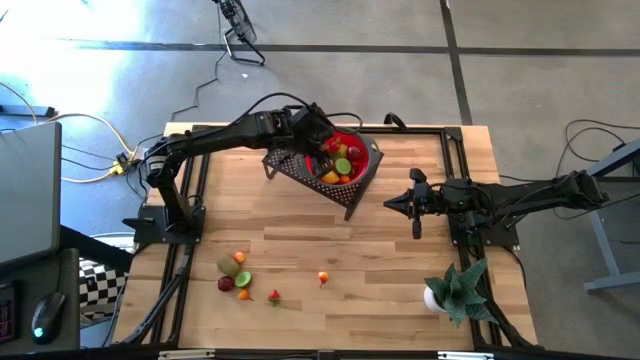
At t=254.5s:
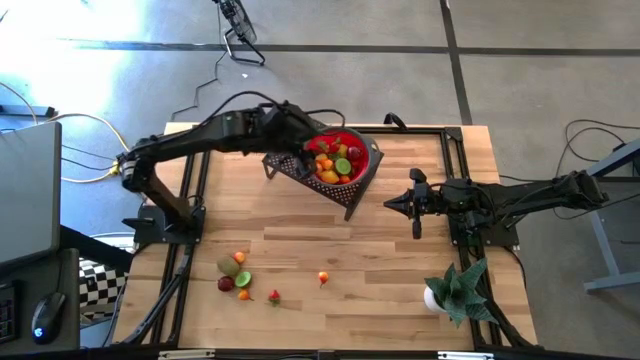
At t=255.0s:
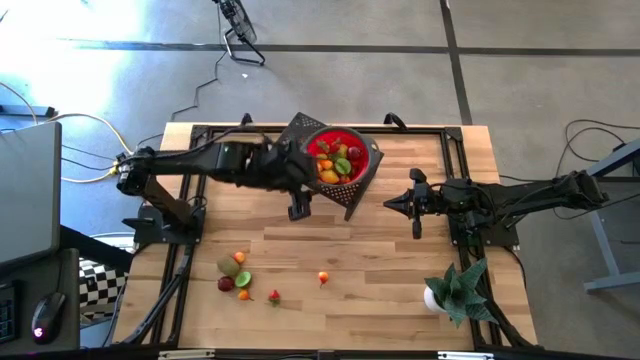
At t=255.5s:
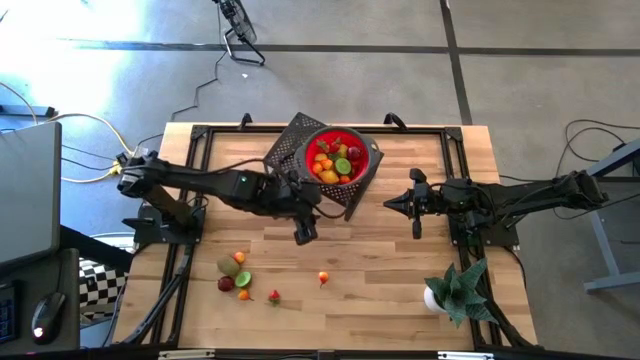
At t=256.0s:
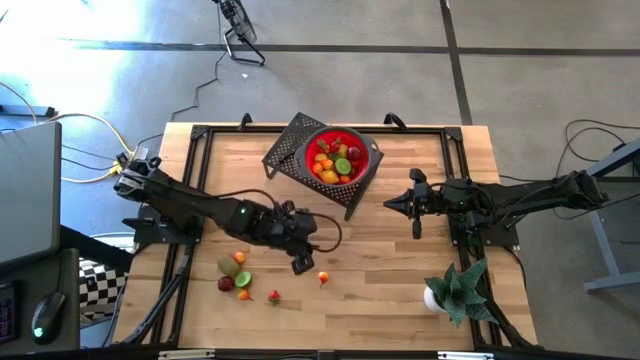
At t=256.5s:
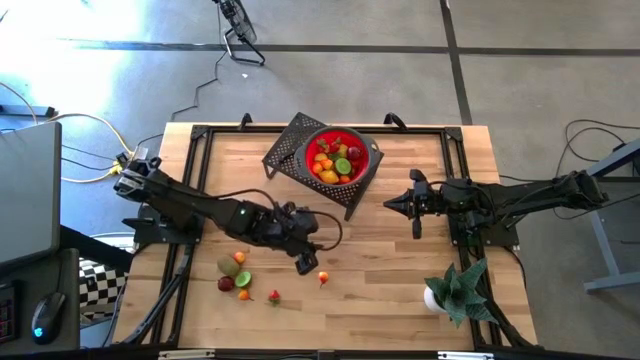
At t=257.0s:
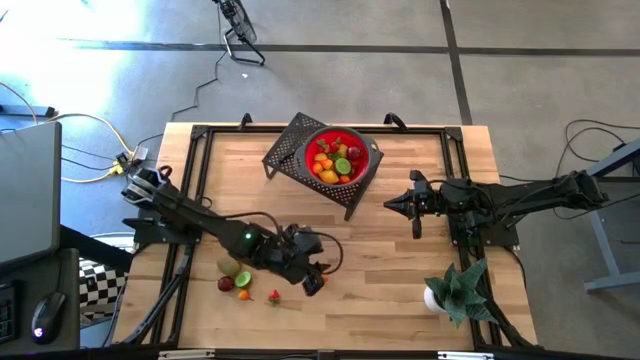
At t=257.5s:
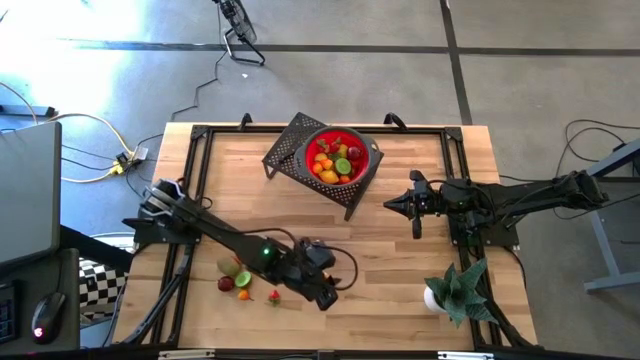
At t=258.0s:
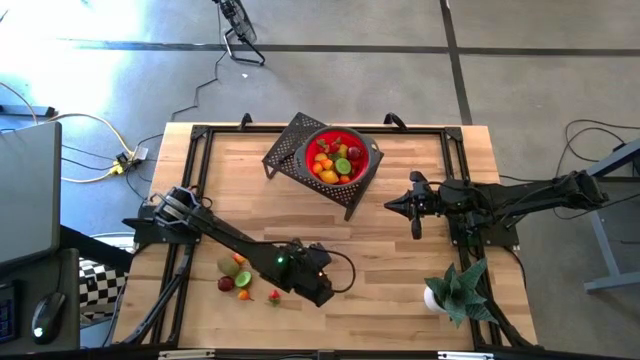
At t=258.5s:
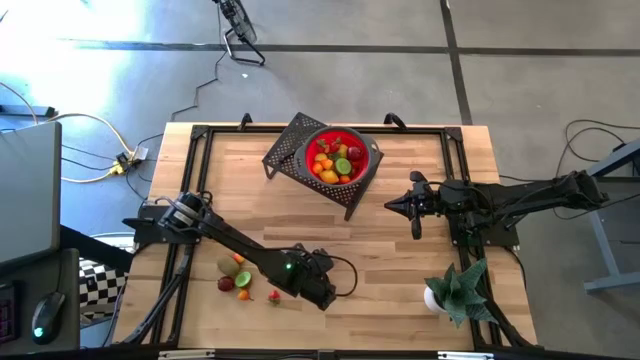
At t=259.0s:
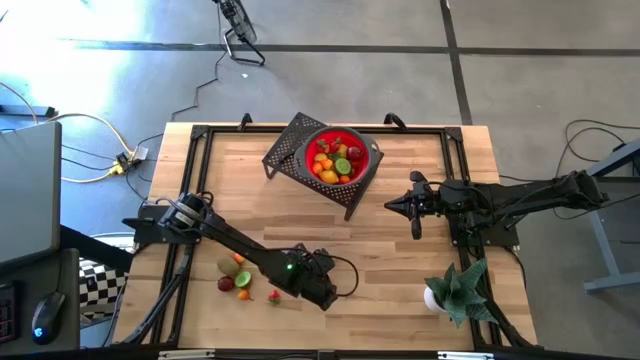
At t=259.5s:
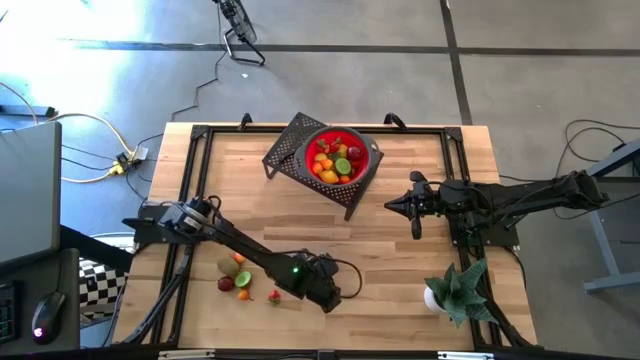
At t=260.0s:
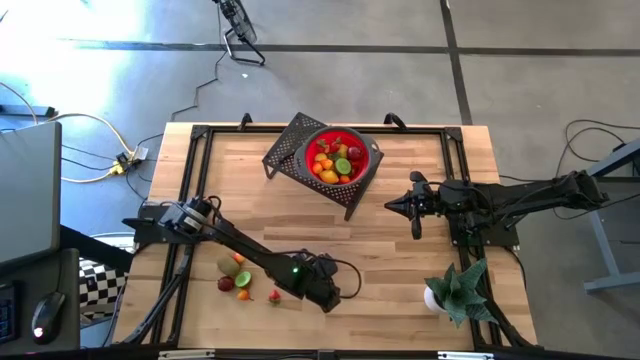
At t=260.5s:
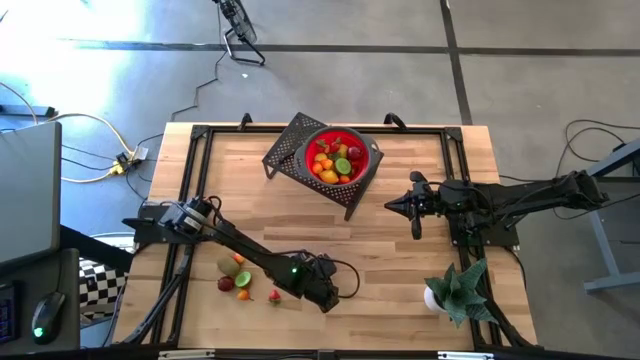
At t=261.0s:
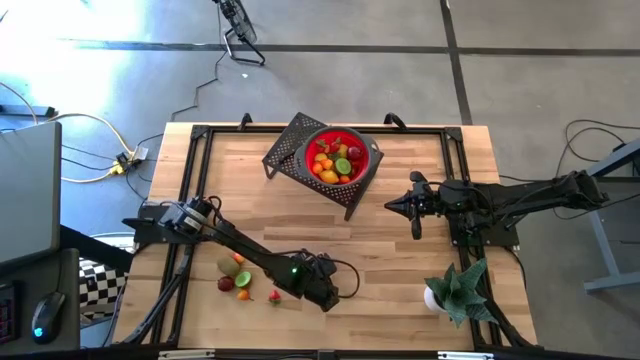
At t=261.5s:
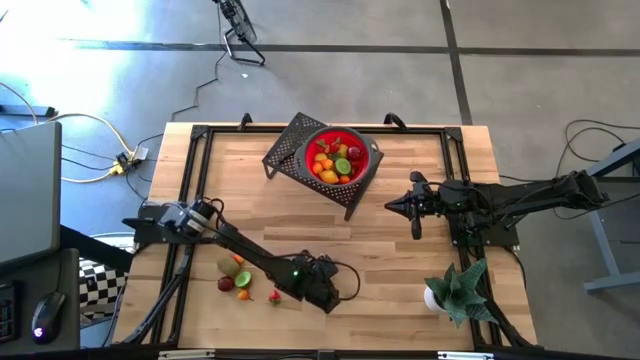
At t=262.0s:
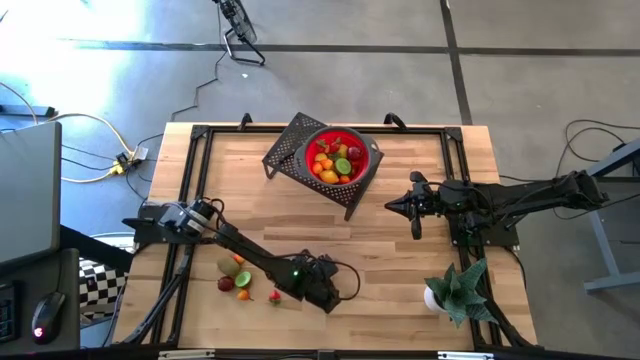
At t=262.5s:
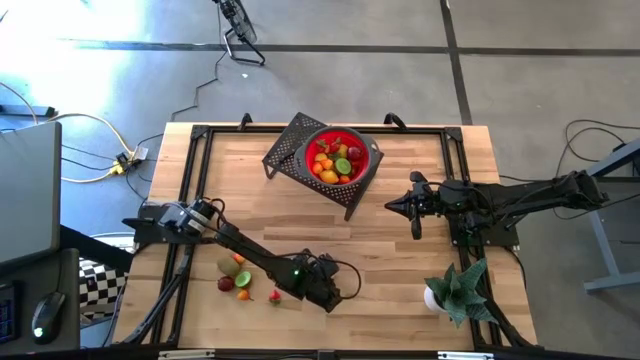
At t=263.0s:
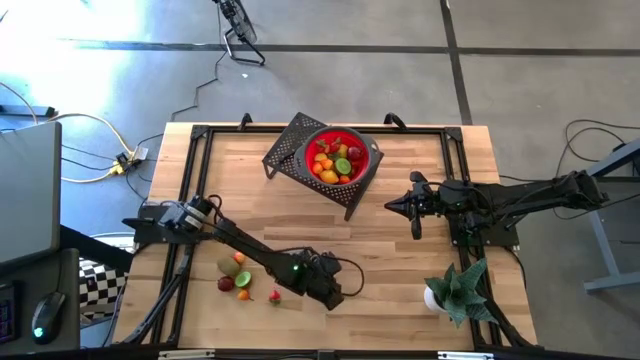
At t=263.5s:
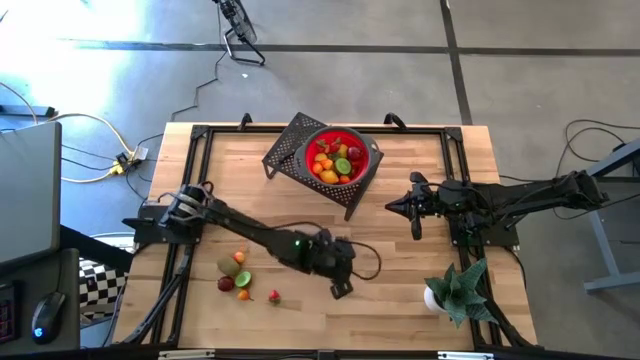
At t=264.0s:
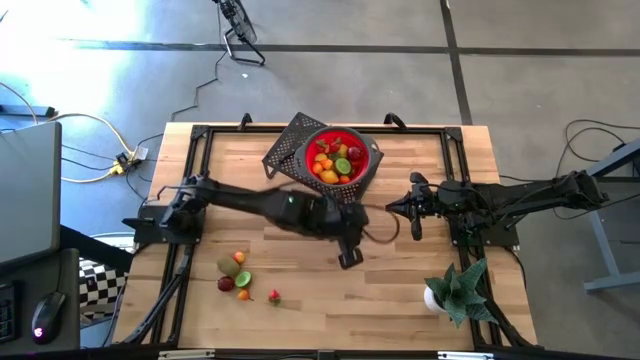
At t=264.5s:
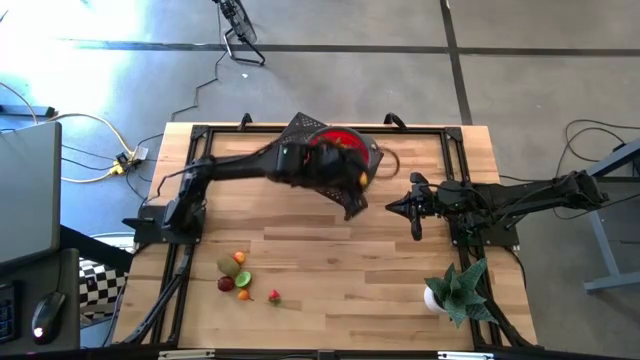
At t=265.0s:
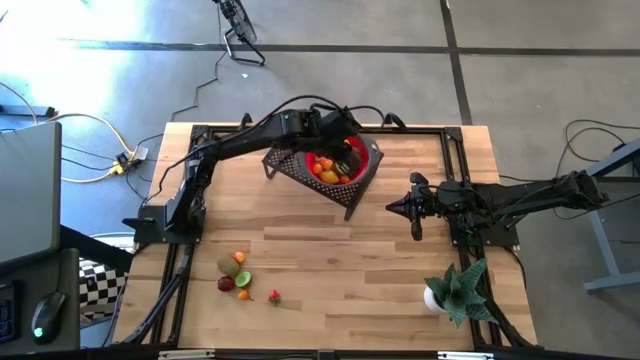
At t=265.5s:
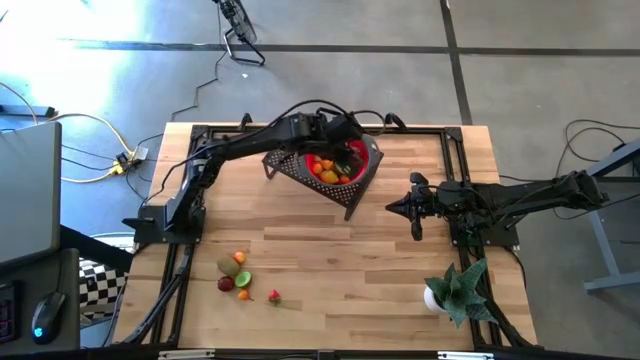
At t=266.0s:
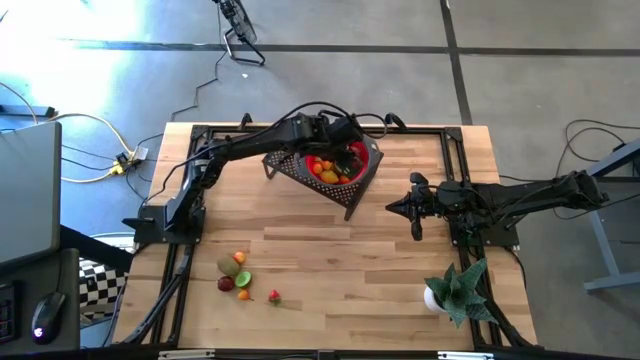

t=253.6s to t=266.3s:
Task: Pick & Place Fruit
Put the pear into the strainer bowl on the shelf

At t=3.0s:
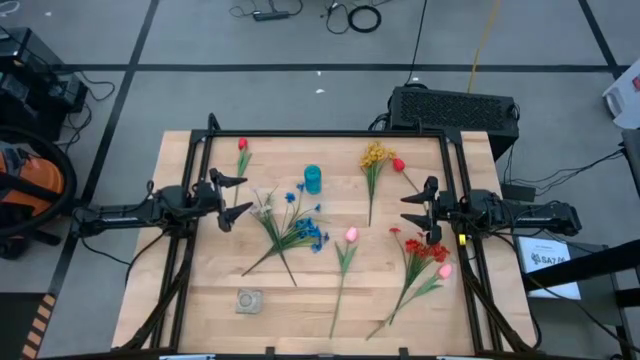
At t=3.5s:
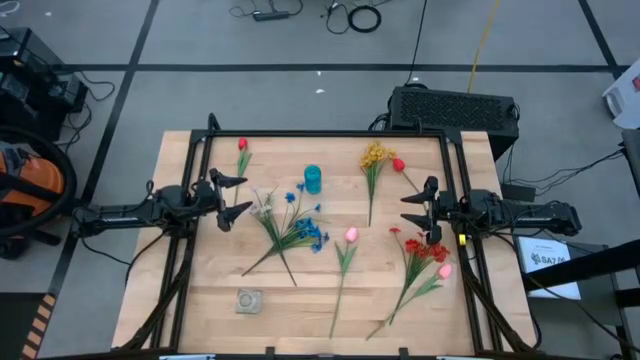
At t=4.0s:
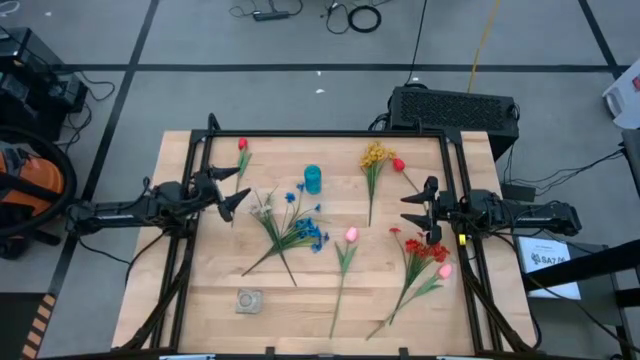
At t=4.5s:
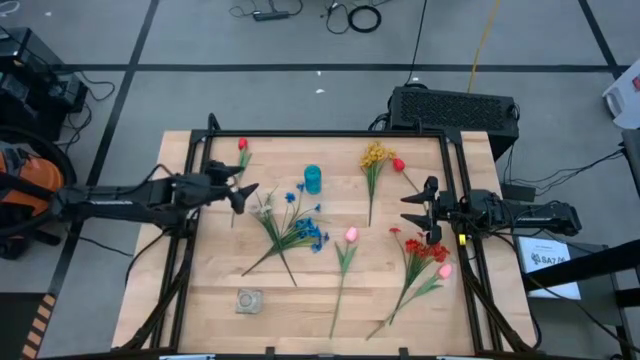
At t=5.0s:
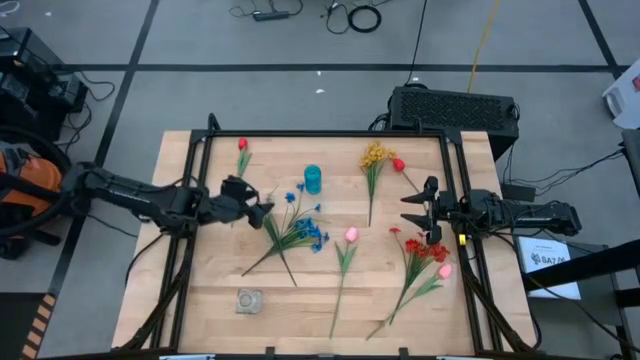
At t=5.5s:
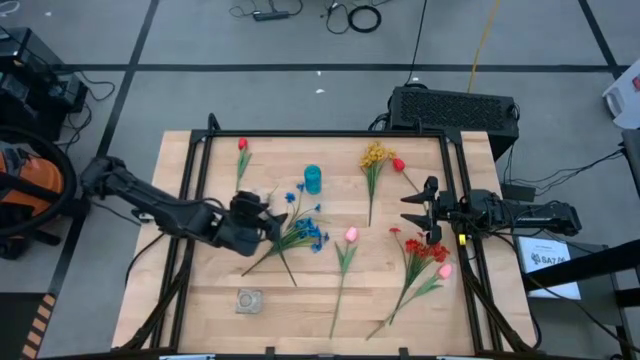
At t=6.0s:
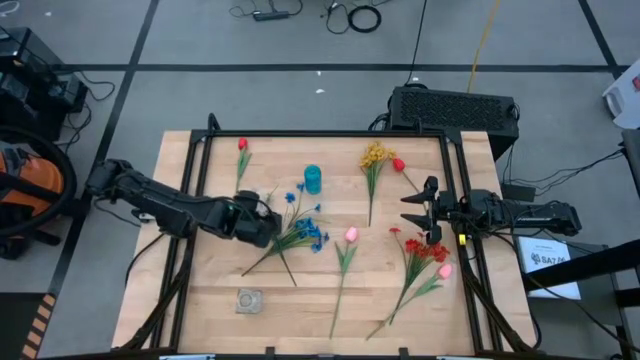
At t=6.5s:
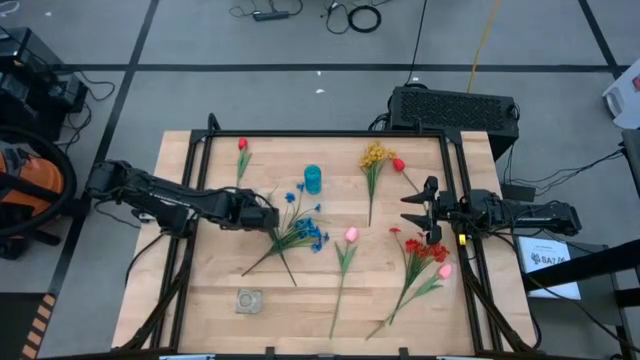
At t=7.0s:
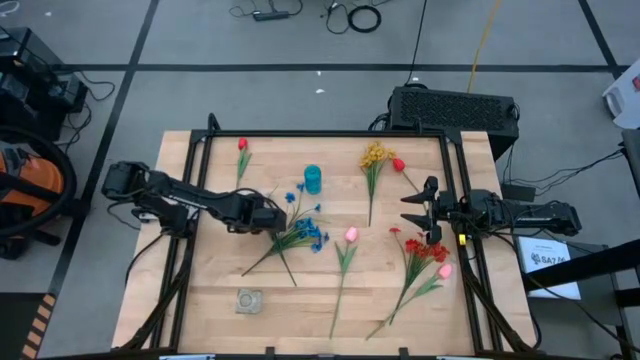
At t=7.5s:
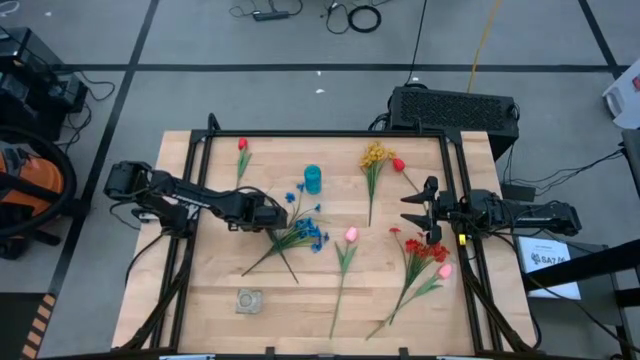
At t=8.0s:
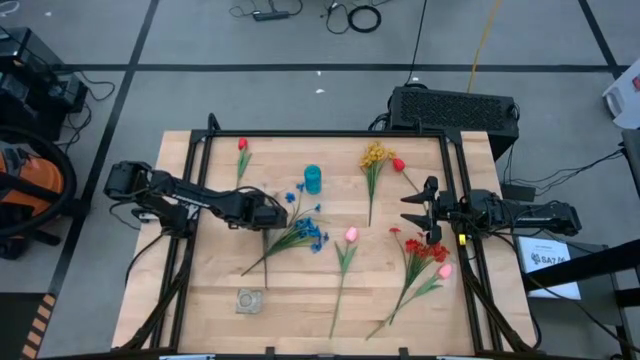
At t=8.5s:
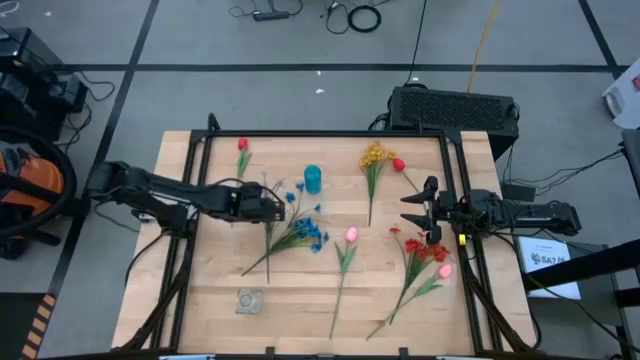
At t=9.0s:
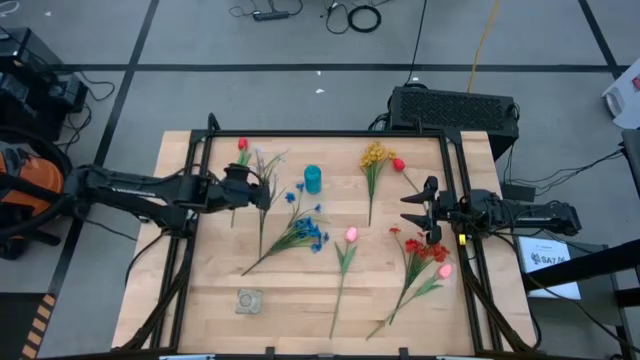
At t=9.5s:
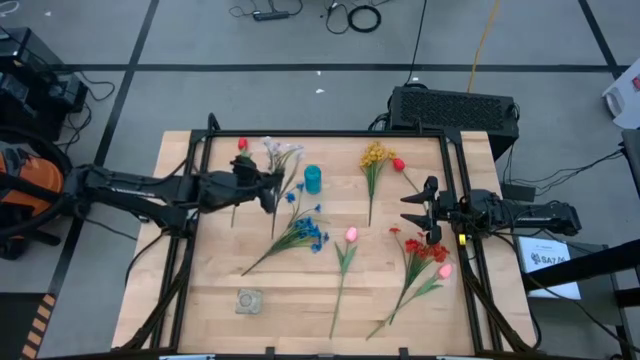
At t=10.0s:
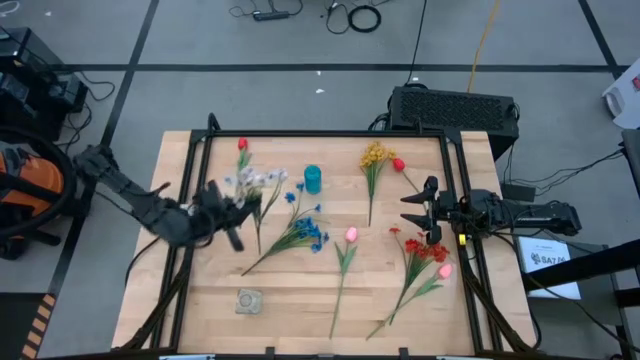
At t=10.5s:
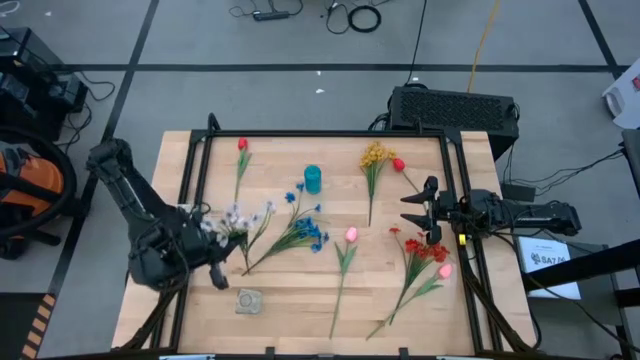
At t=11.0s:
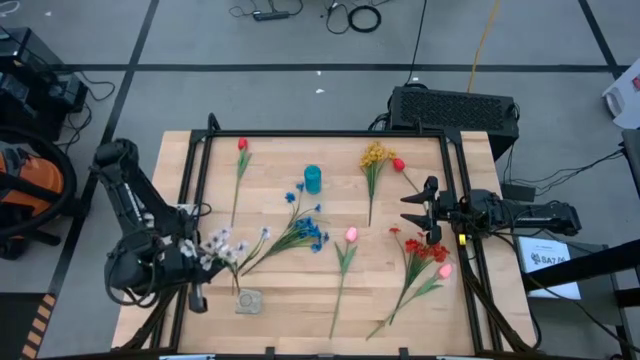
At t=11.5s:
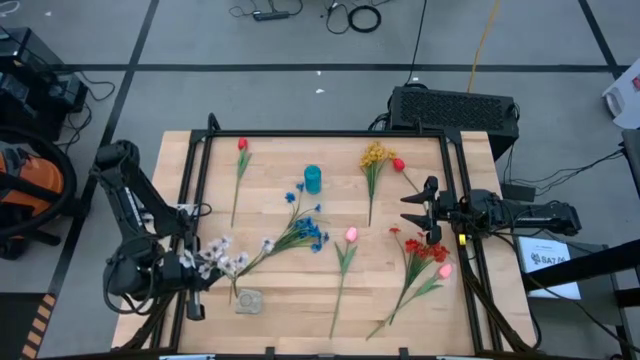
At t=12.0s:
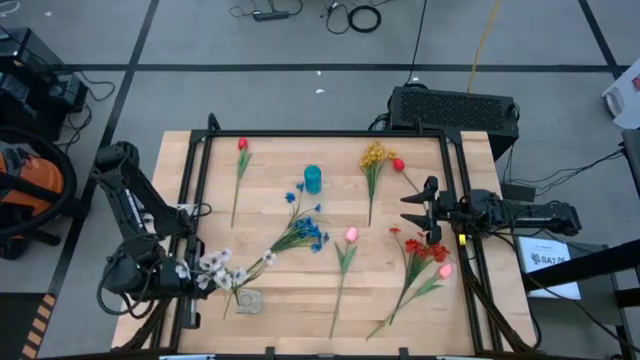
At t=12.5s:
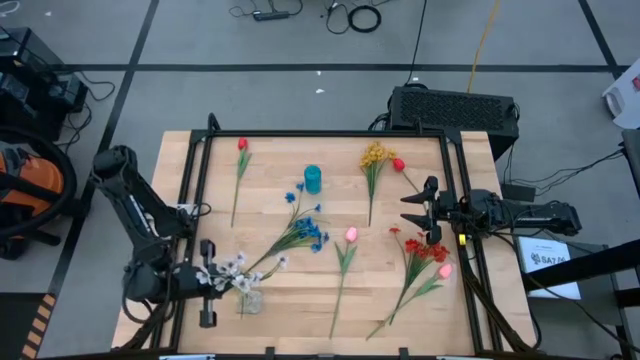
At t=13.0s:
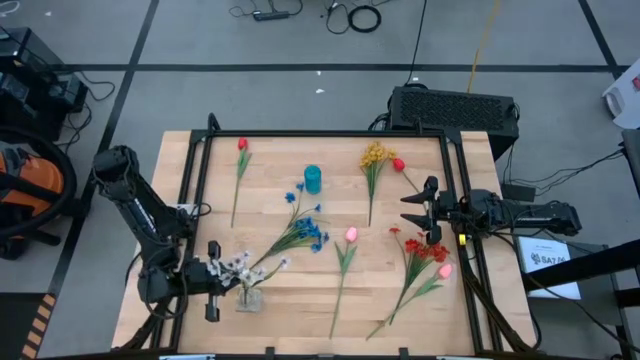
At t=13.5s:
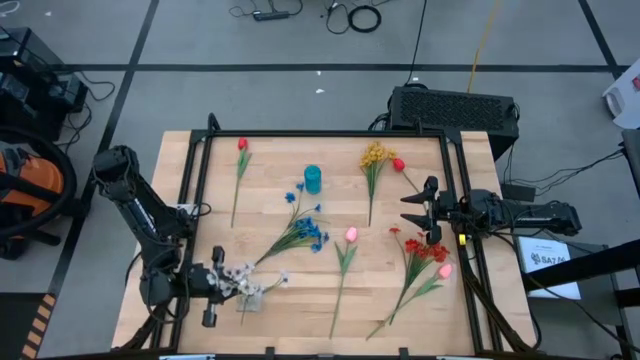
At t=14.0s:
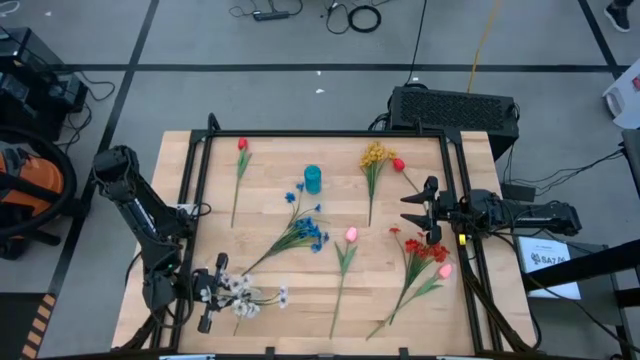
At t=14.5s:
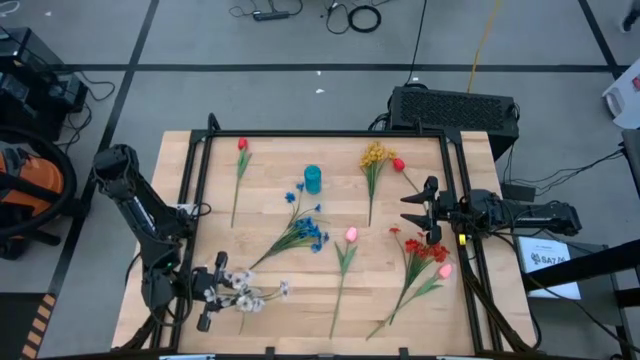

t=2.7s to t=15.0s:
Task: Sort flowers into vase by color
Put the white flowers into the transparent flower vase
